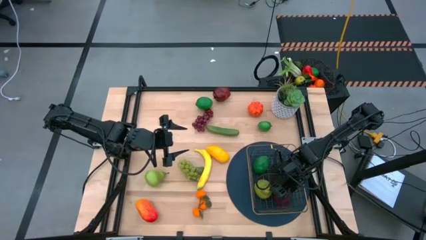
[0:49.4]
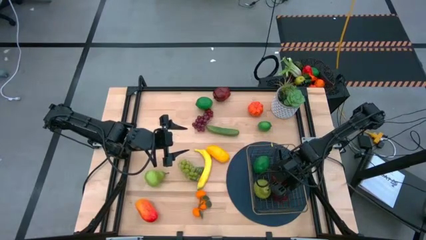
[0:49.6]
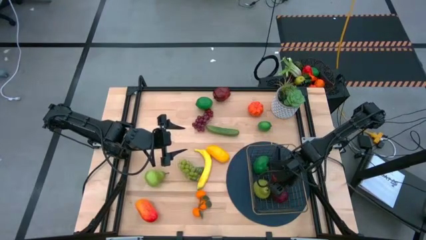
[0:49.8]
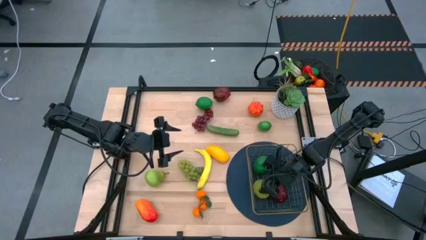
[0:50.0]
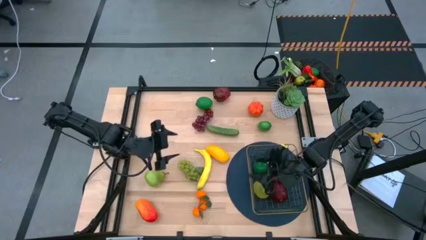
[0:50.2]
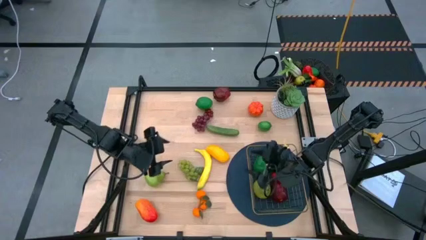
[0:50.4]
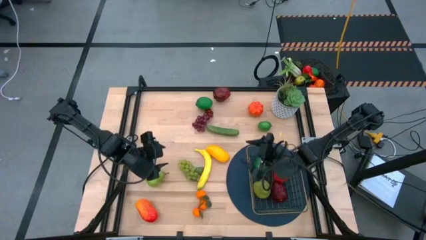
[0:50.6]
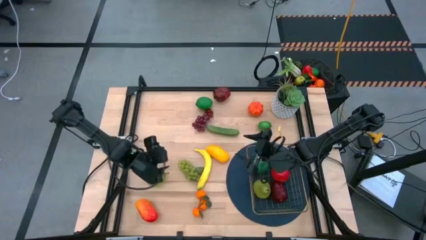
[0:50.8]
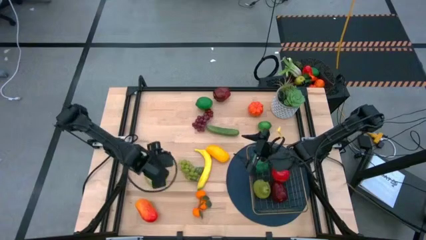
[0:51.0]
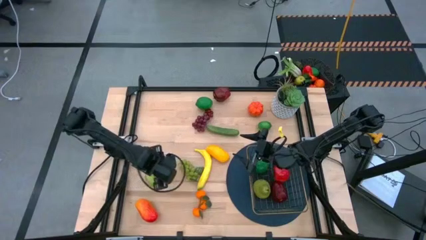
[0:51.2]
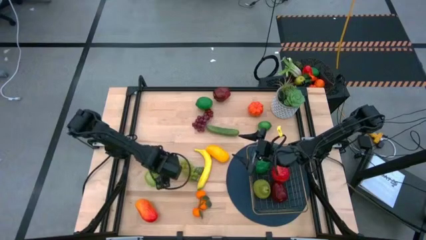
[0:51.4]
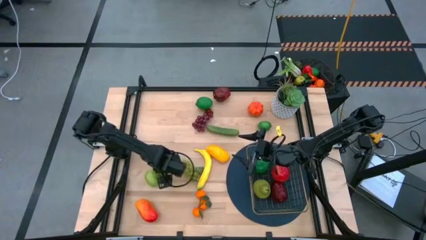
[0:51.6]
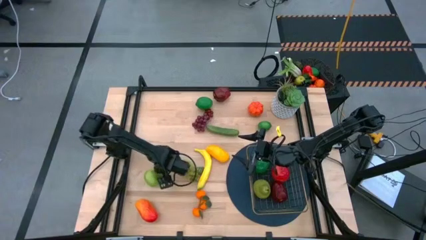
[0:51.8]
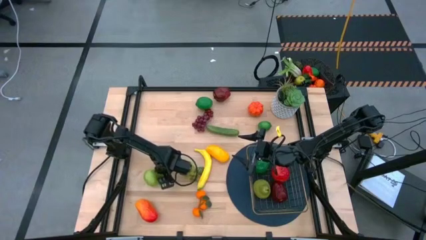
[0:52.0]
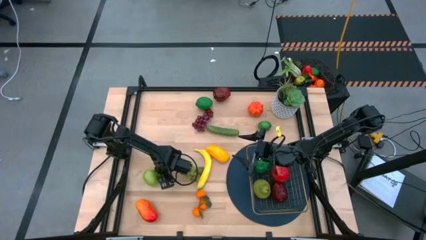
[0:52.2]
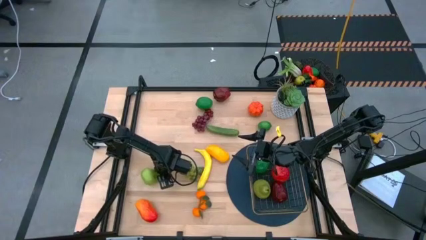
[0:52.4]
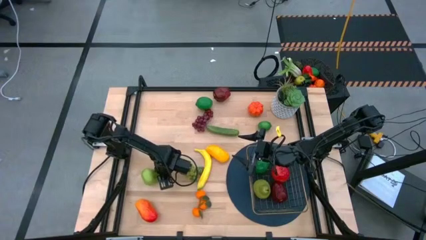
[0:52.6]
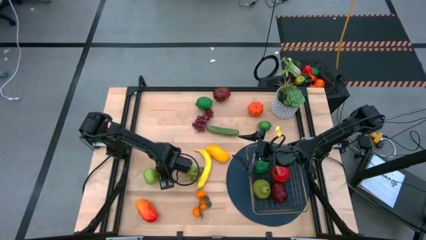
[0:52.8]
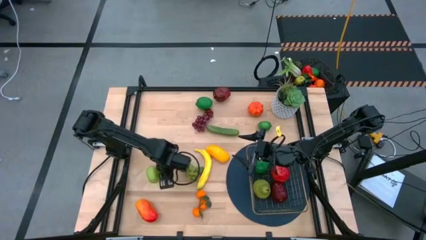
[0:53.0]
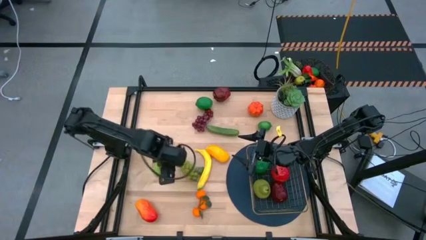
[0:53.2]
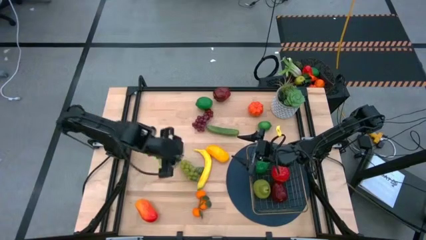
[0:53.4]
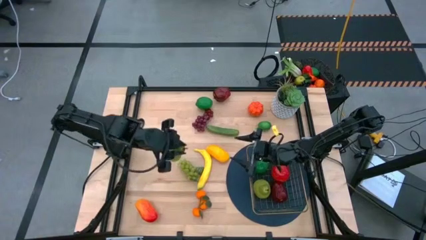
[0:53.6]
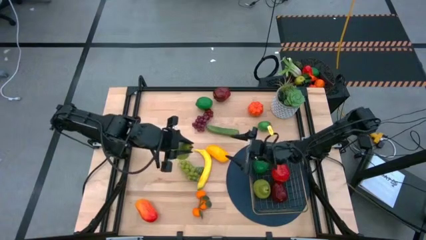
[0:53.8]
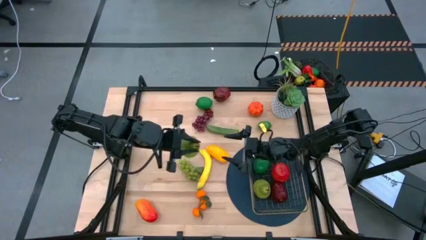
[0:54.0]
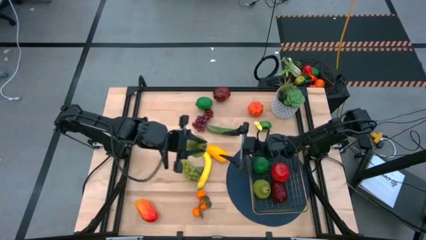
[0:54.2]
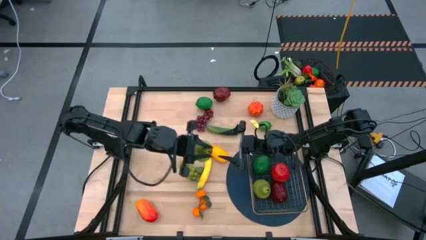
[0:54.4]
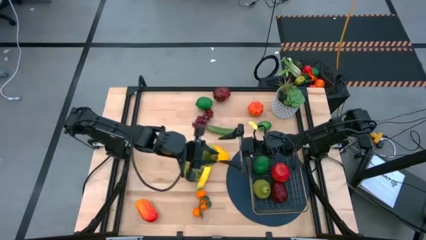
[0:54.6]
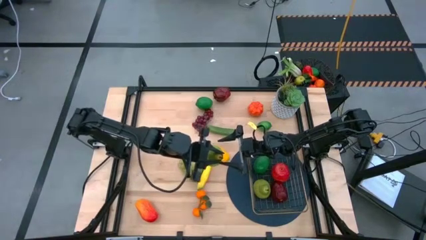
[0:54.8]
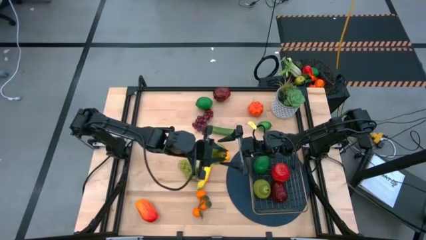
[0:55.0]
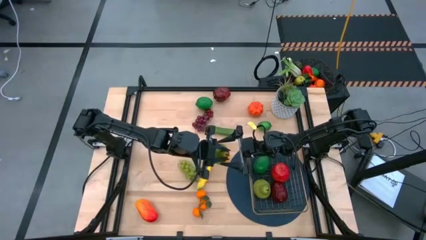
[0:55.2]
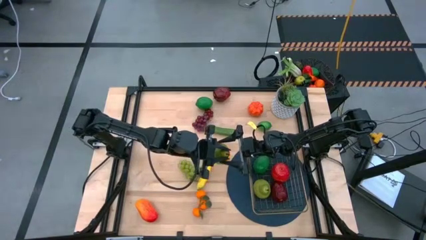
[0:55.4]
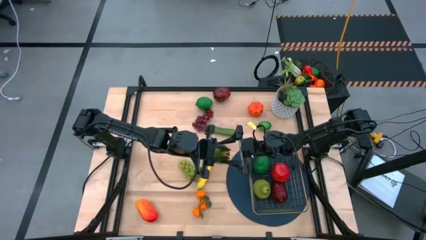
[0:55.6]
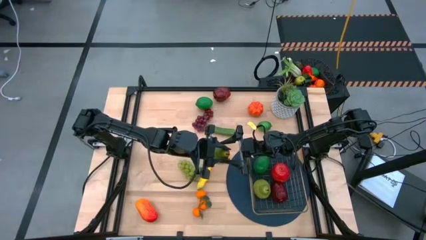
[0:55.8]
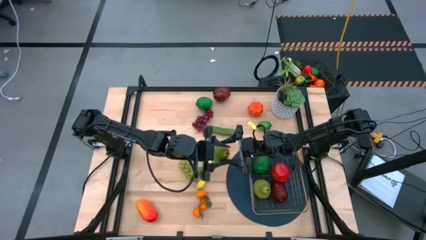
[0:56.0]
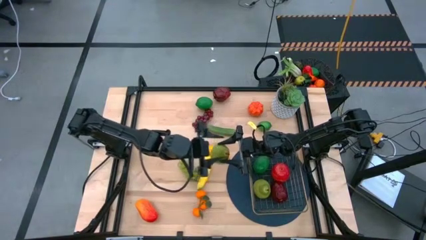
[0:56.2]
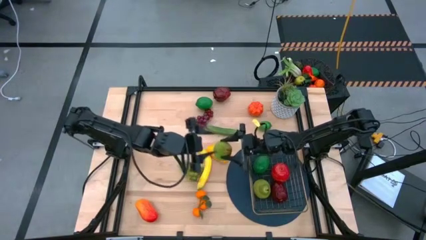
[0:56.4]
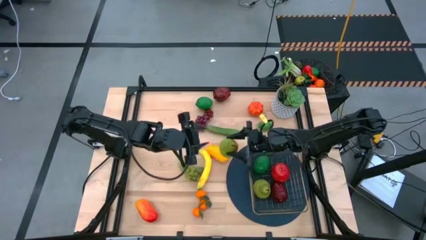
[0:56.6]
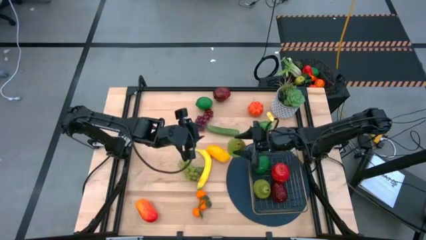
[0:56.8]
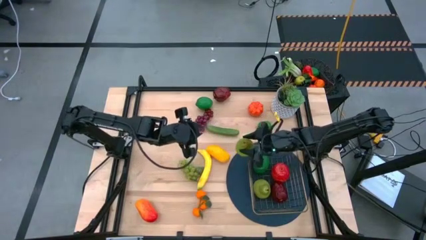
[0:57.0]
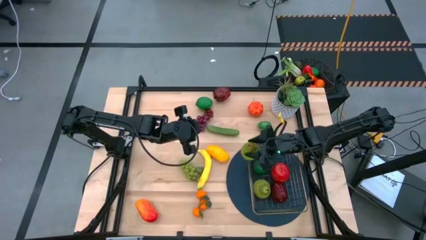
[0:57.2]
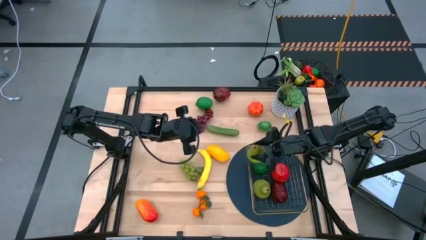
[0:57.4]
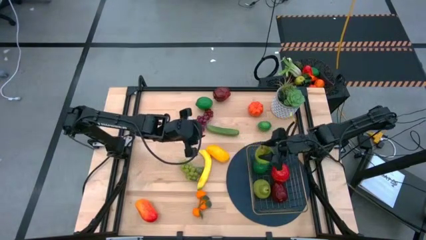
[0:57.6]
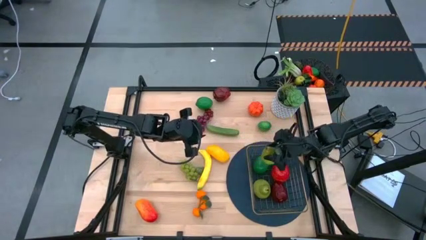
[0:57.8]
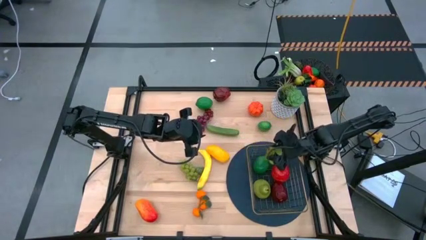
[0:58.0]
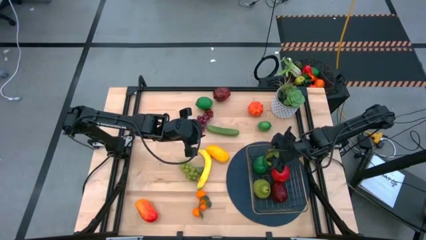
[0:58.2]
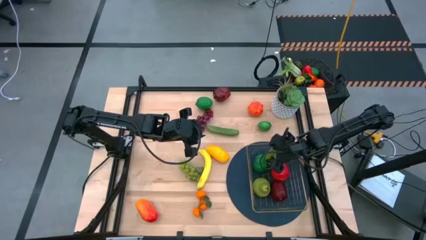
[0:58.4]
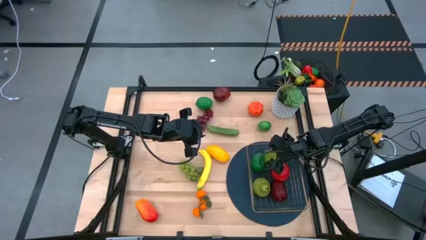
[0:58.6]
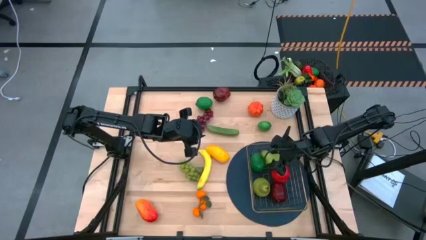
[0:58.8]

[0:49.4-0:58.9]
Task: Build produce basket
Put the pear into the wire basket

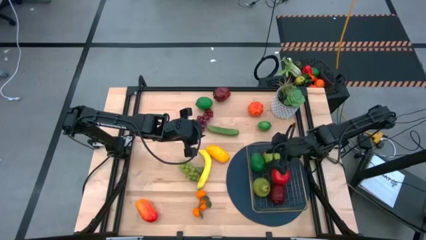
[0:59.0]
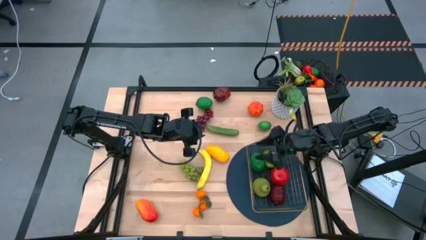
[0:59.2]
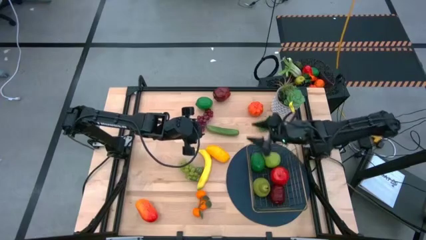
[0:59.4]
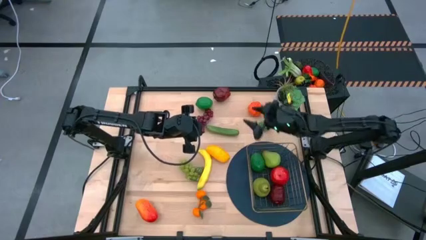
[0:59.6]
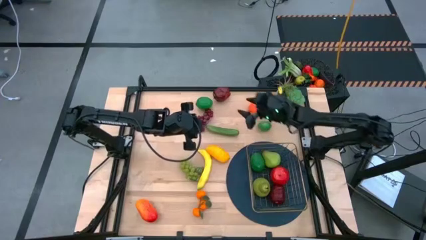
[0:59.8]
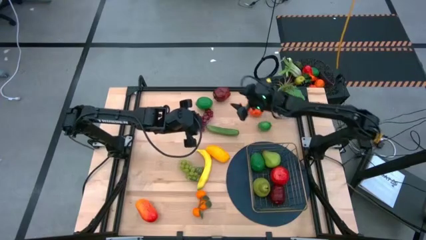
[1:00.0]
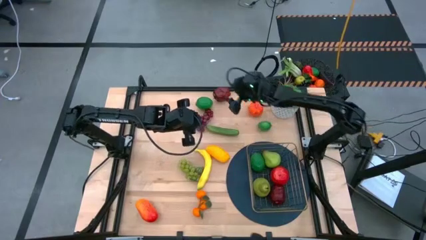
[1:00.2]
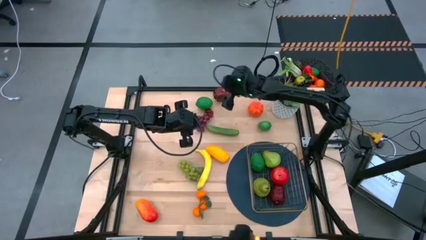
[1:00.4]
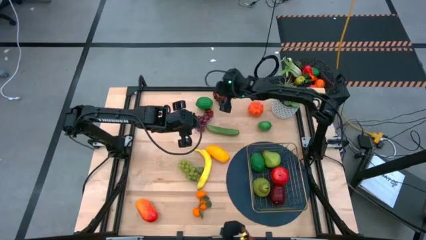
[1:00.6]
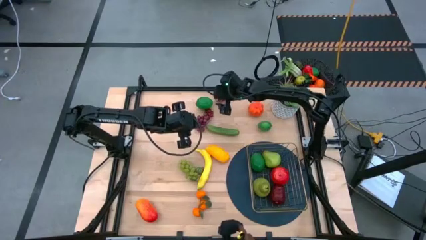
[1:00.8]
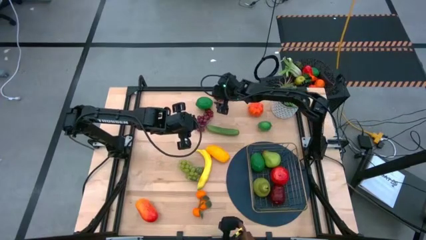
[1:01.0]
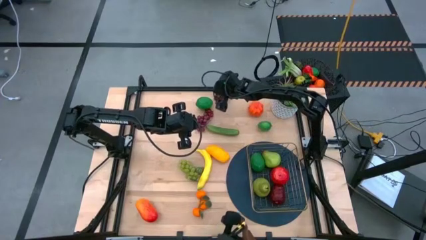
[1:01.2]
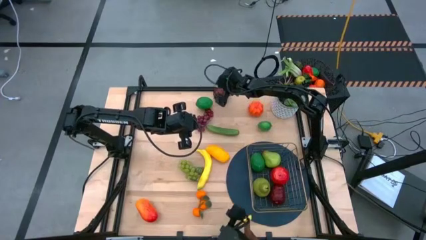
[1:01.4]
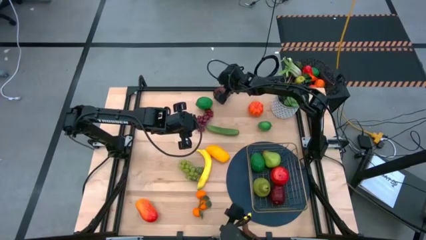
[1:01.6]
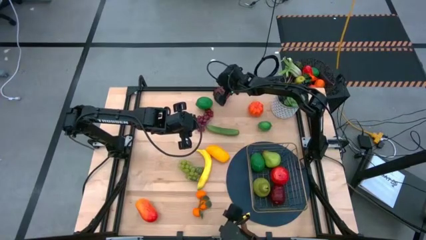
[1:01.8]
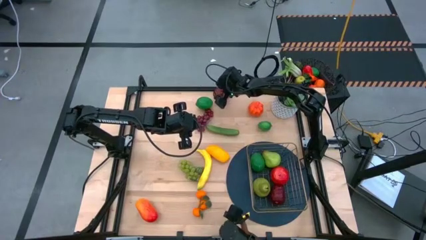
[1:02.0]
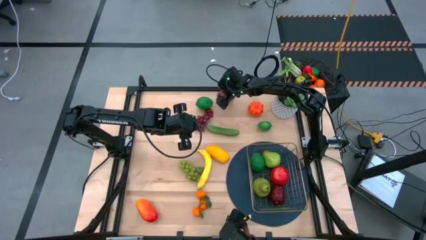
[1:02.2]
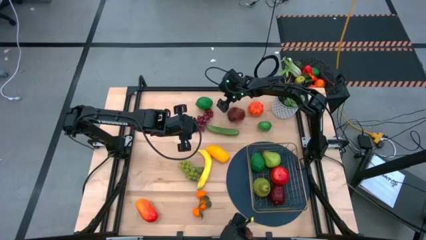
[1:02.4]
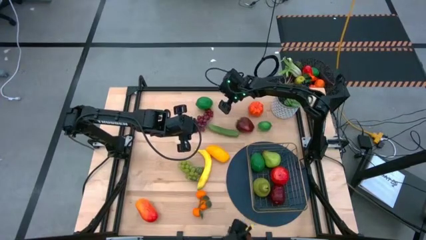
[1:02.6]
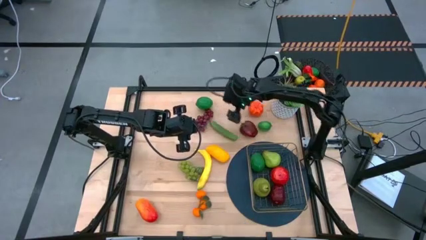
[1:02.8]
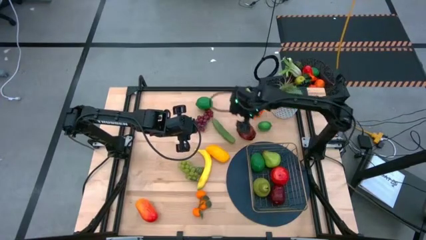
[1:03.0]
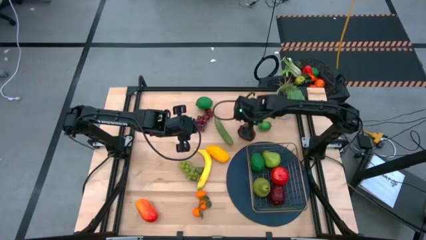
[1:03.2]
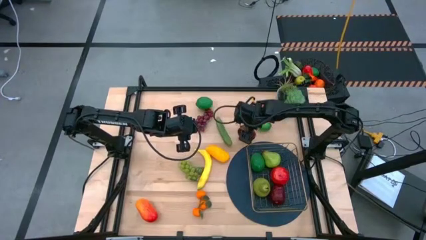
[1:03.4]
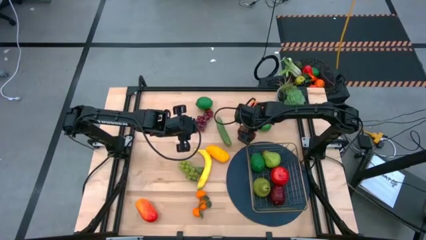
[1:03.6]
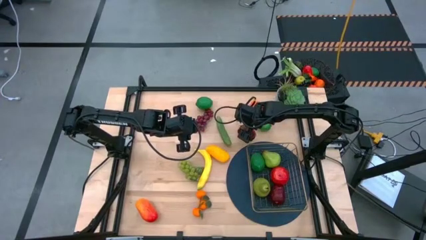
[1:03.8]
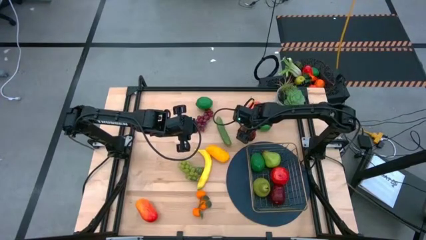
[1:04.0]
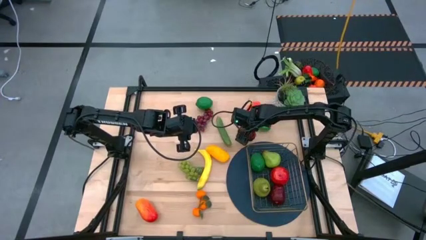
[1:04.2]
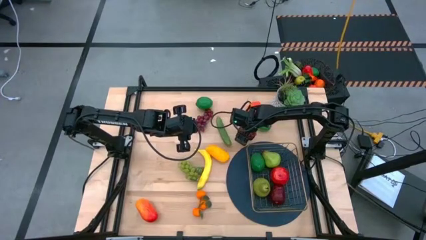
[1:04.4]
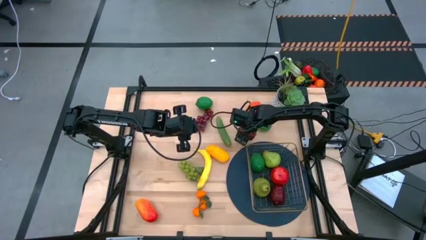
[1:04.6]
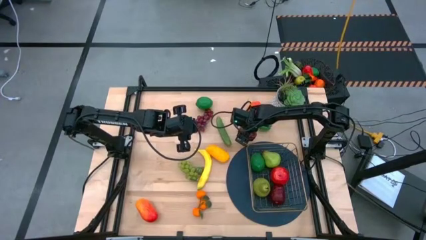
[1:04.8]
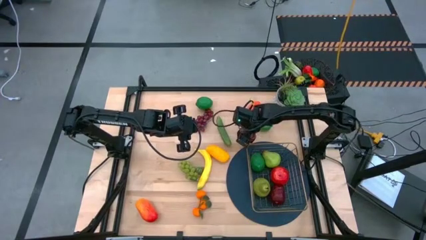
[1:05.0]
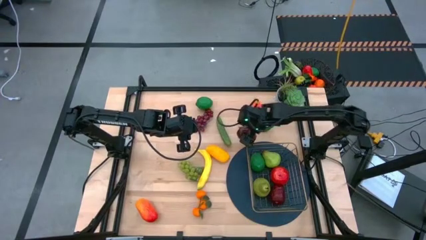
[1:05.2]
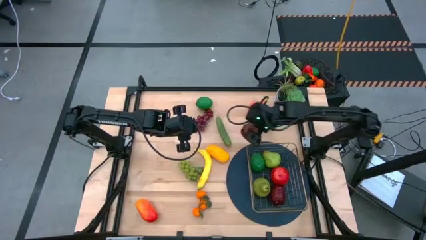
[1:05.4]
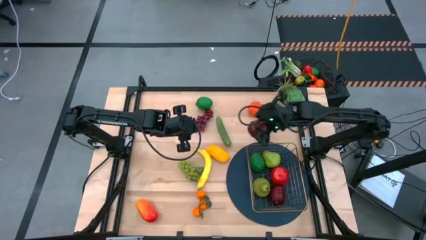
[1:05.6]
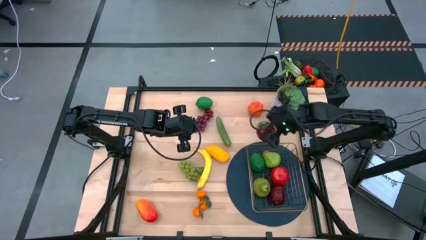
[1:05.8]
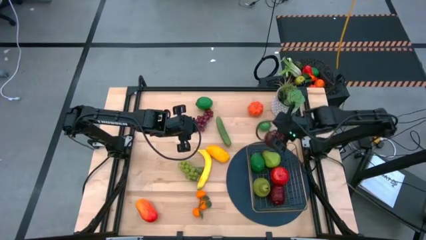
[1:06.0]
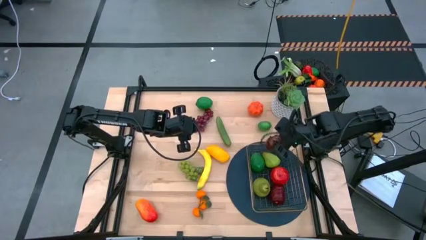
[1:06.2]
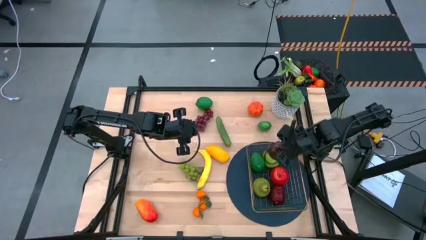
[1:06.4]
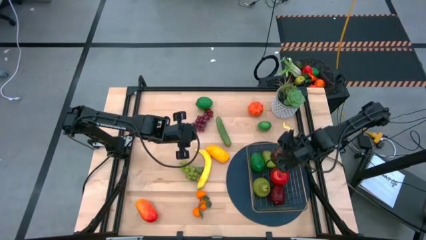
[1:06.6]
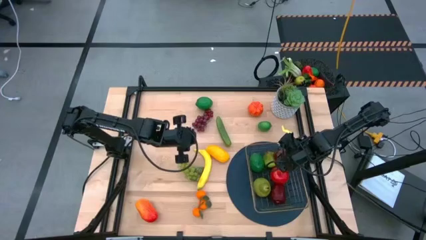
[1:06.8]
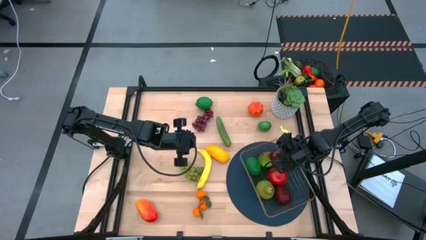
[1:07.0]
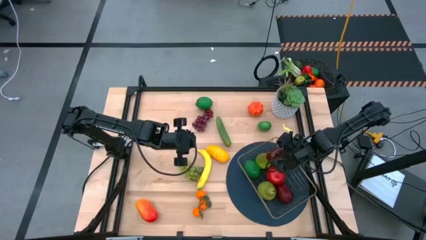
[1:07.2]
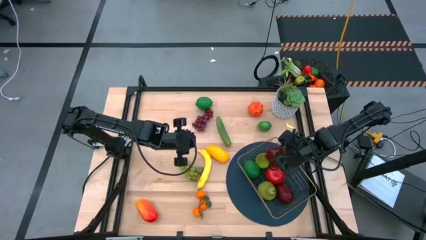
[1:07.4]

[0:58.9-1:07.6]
Put the dark red apple into the wire basket
